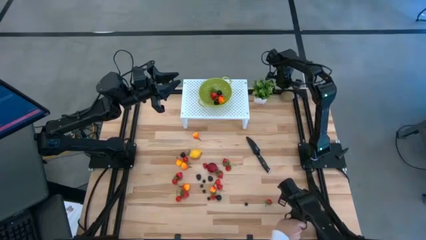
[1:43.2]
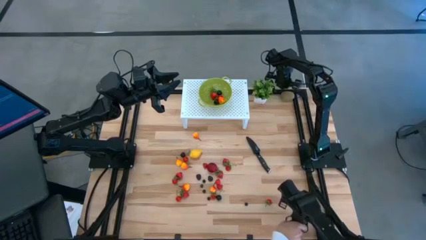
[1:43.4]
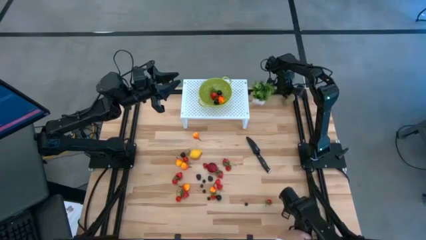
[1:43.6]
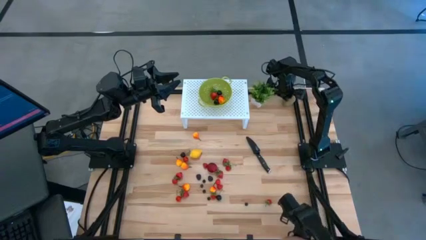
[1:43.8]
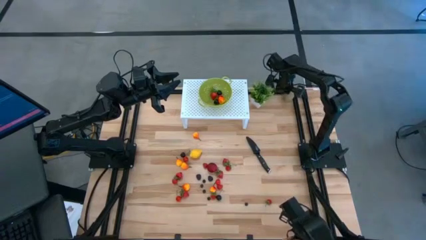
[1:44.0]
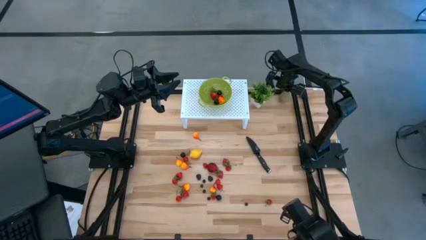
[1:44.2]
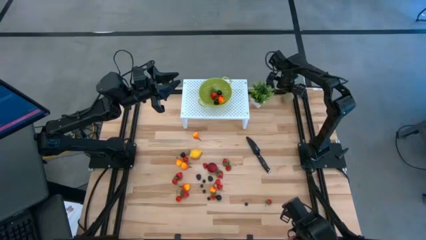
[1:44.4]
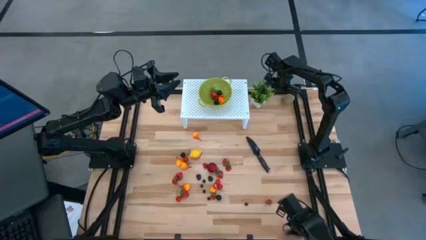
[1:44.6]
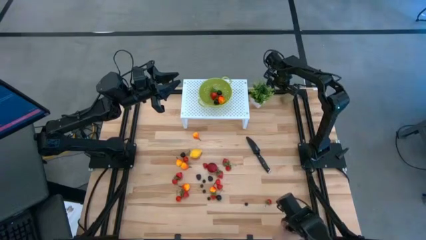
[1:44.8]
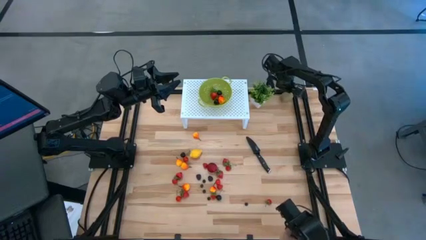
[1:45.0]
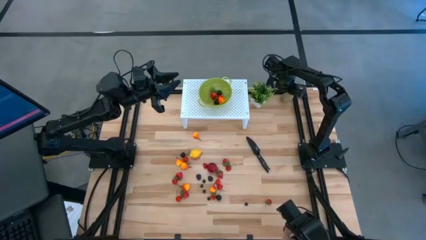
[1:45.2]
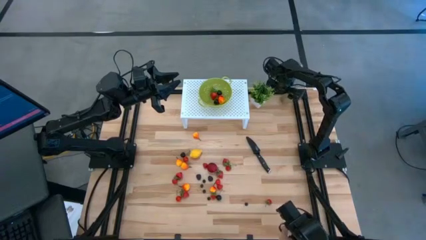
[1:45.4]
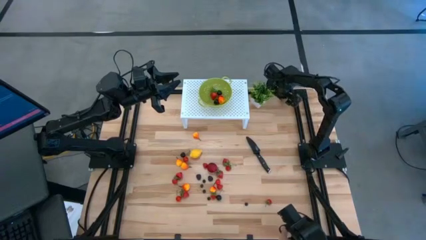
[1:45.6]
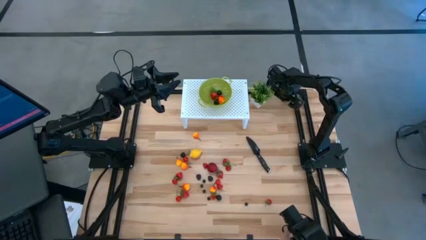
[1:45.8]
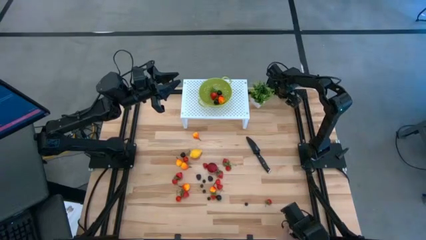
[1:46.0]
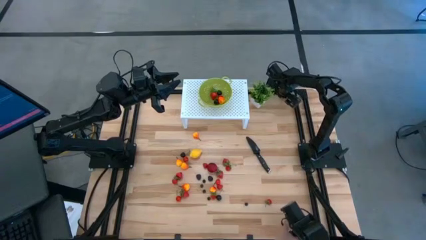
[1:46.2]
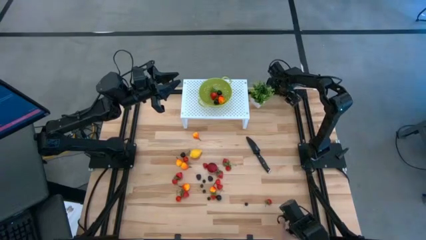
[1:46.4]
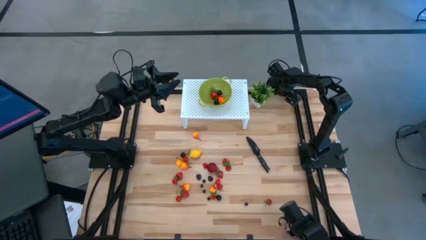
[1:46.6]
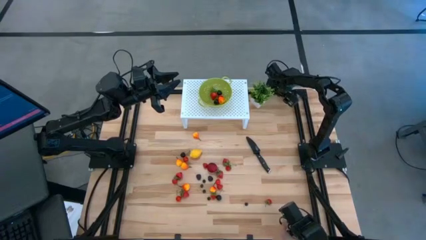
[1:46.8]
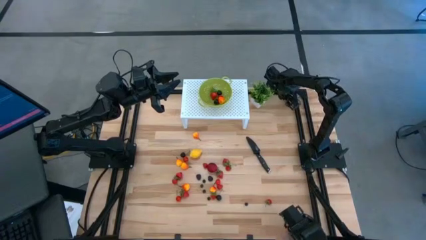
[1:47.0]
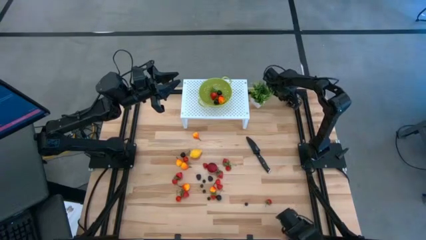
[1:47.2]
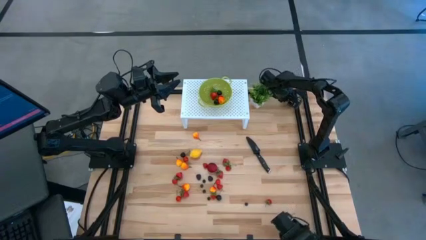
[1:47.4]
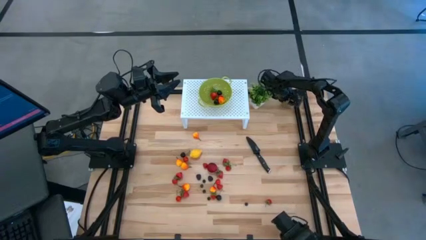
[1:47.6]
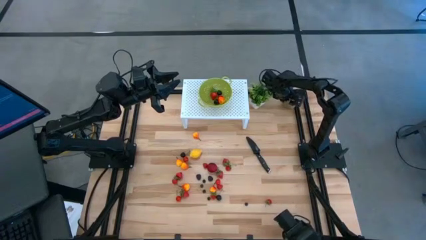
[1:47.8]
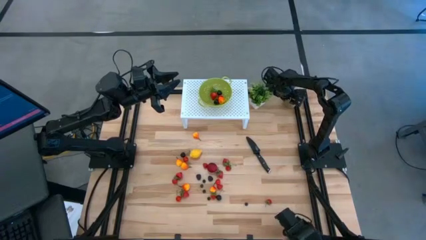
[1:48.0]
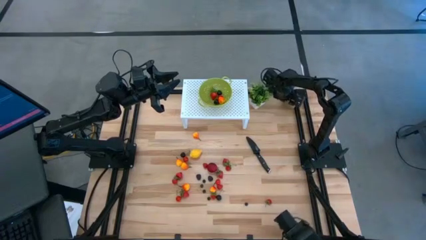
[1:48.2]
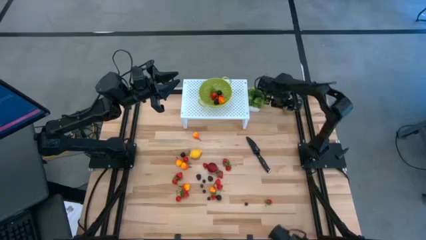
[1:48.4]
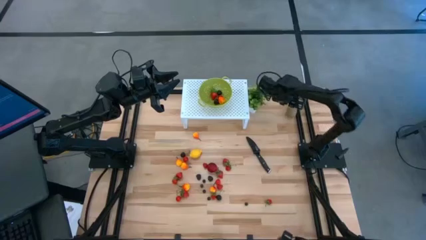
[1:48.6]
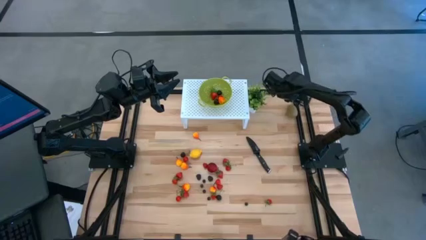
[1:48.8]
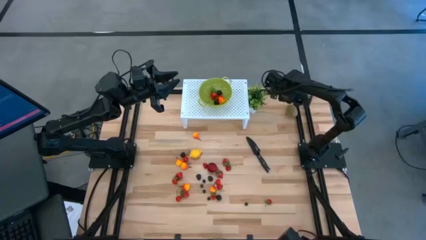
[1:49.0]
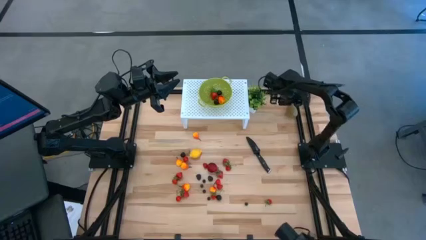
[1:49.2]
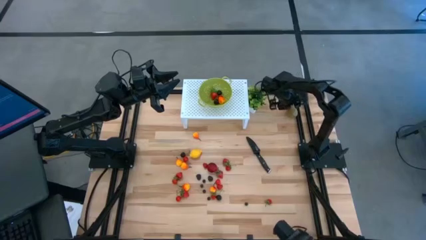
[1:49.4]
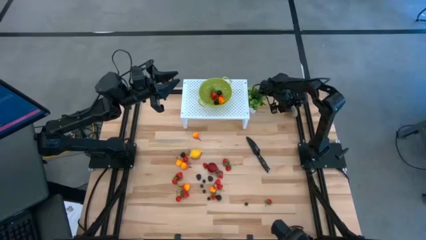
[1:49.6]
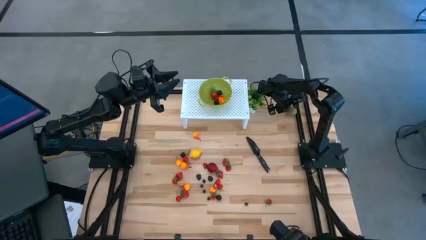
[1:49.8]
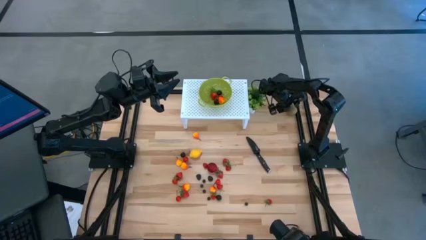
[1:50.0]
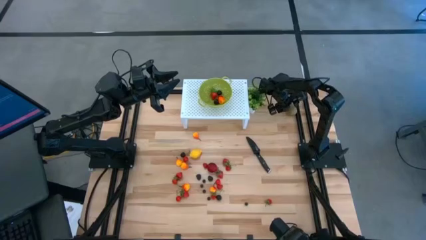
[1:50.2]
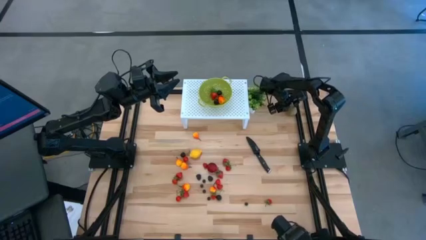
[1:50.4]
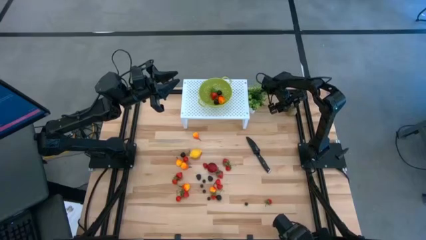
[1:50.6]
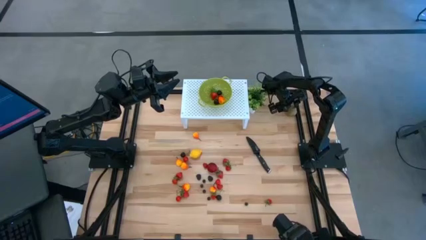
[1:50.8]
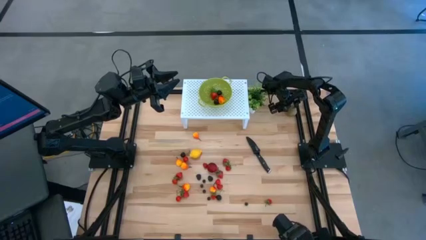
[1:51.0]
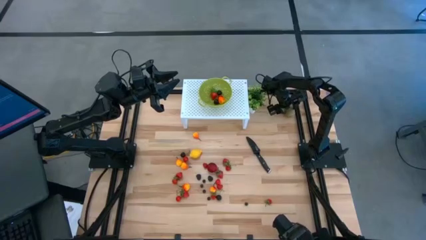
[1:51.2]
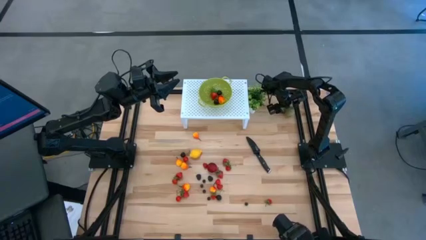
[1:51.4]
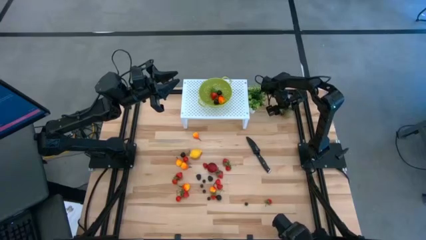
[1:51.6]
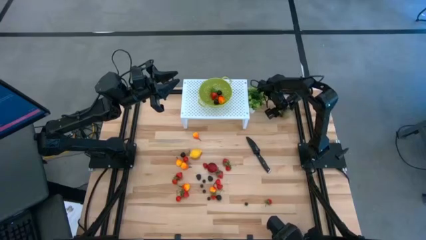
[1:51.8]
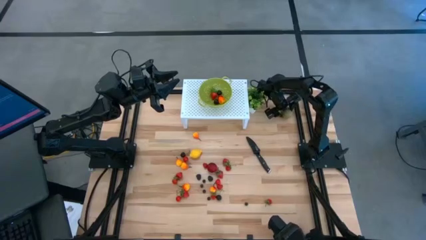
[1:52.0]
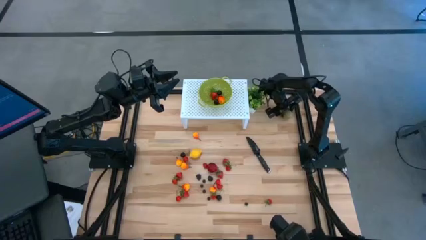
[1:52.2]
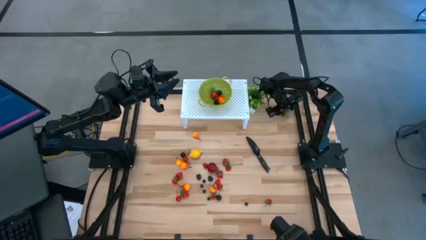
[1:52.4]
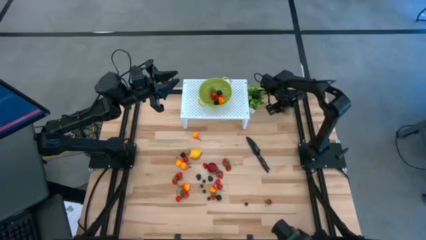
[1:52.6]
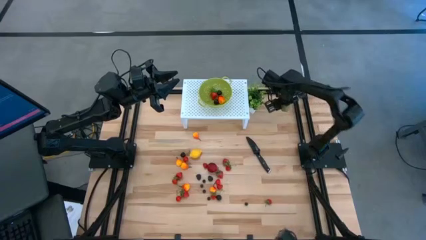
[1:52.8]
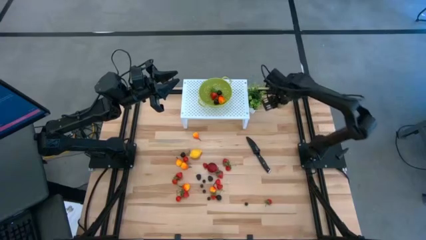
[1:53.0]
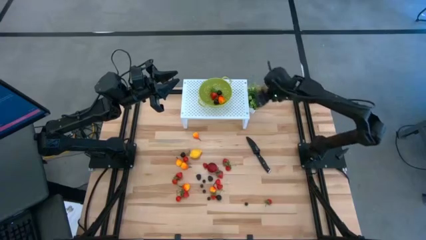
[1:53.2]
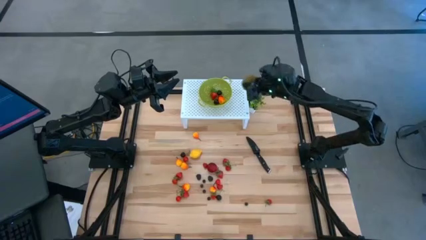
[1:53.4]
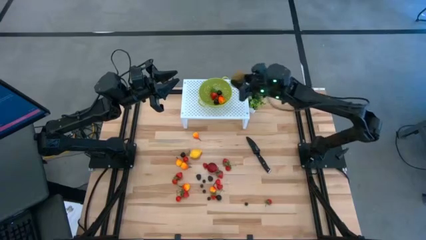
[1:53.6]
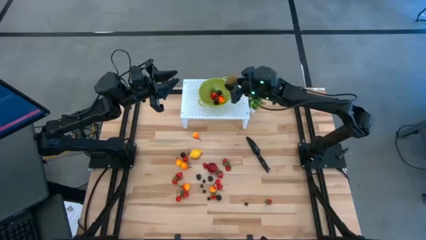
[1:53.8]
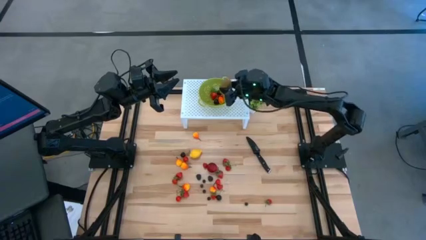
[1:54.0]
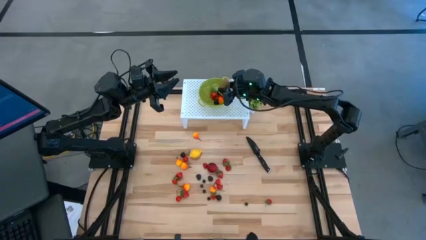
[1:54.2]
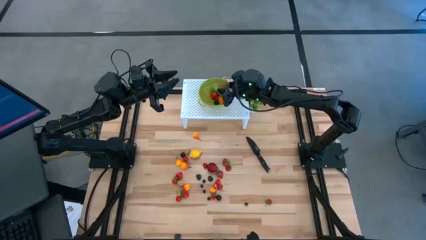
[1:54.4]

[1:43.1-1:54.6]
Task: Pick & Place Fruit
Put the brown kiwi into the green strainer bowl

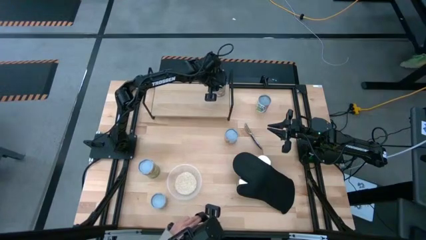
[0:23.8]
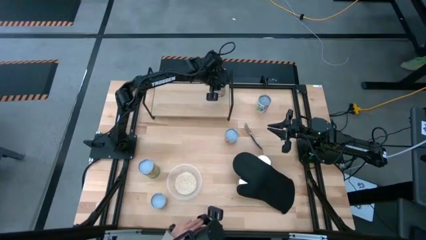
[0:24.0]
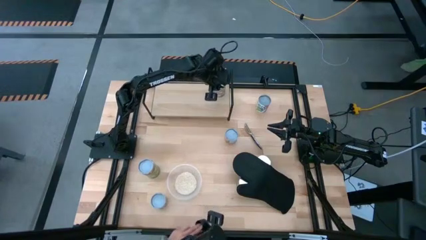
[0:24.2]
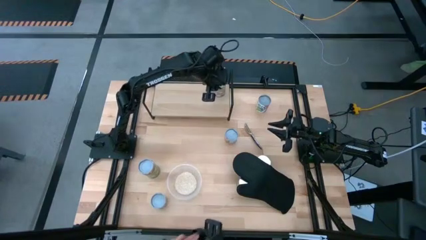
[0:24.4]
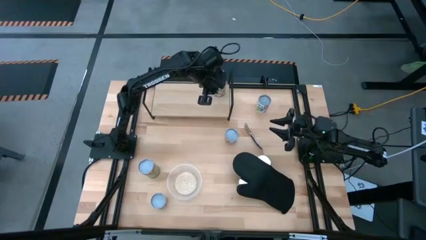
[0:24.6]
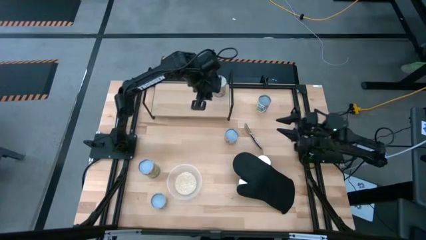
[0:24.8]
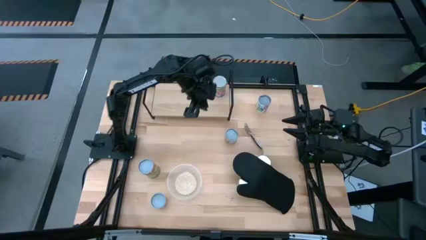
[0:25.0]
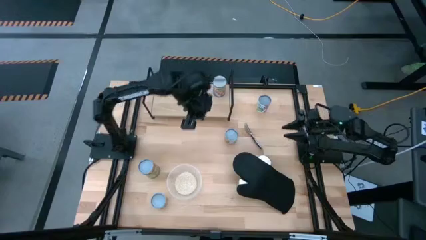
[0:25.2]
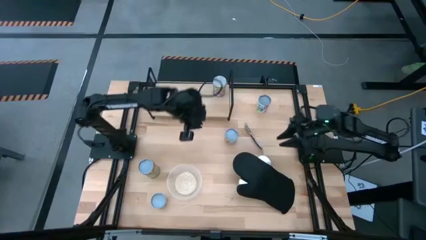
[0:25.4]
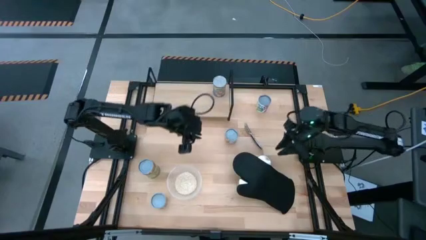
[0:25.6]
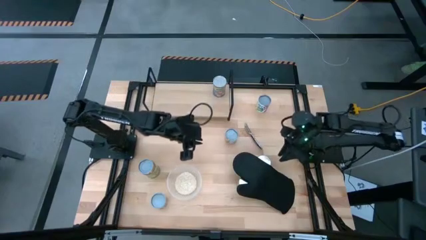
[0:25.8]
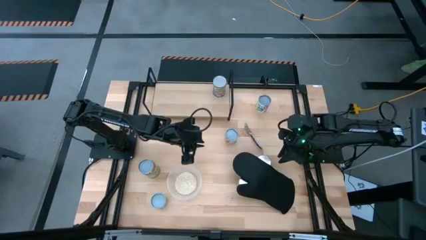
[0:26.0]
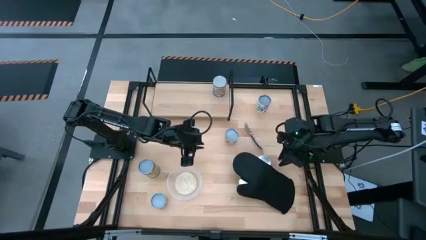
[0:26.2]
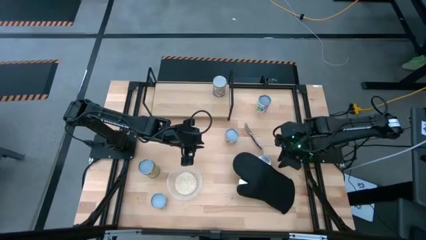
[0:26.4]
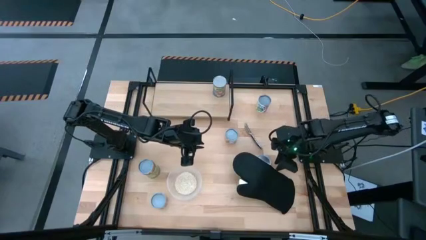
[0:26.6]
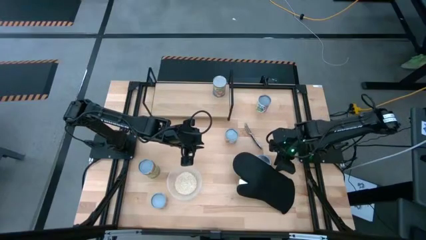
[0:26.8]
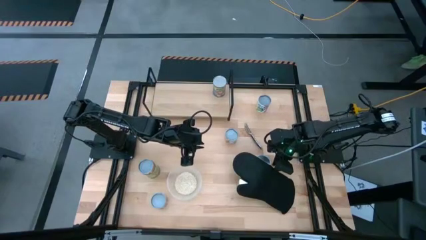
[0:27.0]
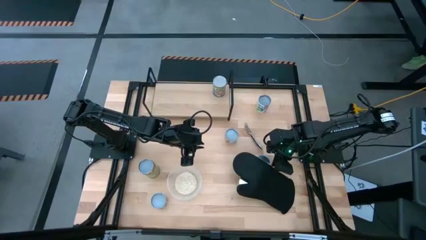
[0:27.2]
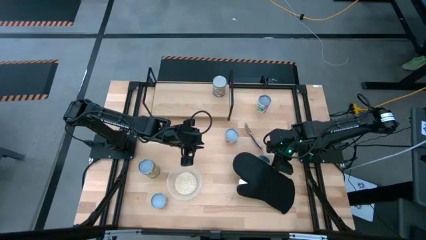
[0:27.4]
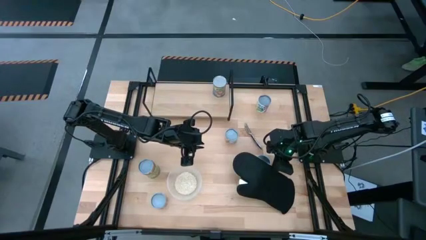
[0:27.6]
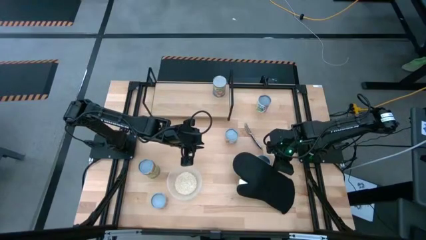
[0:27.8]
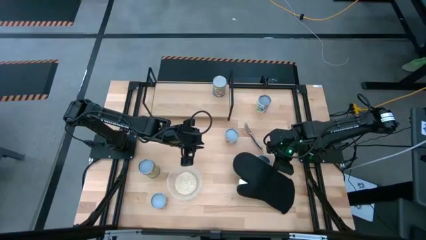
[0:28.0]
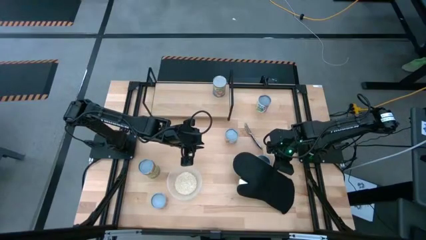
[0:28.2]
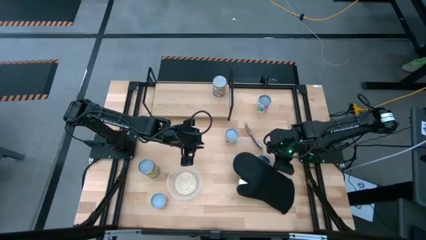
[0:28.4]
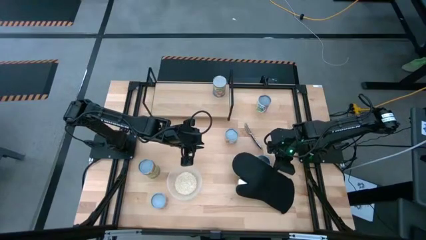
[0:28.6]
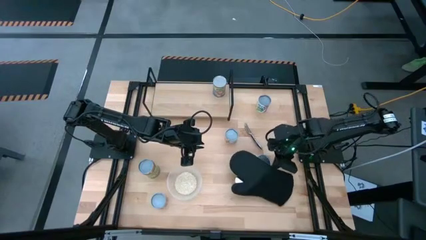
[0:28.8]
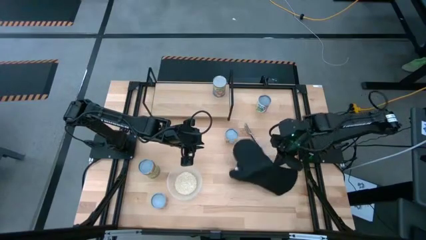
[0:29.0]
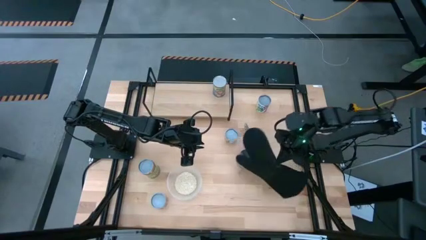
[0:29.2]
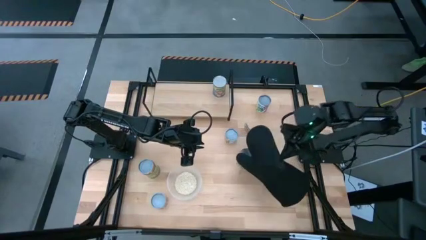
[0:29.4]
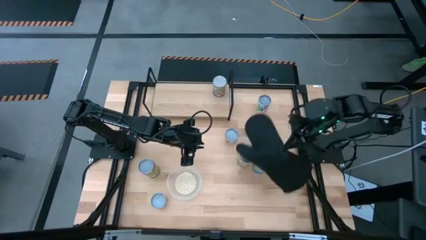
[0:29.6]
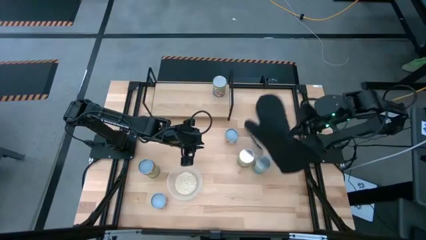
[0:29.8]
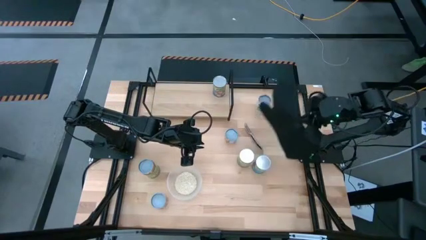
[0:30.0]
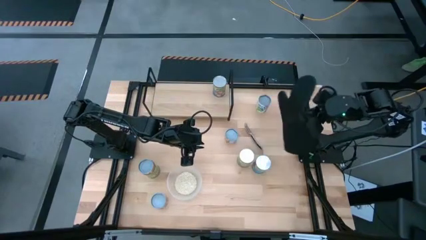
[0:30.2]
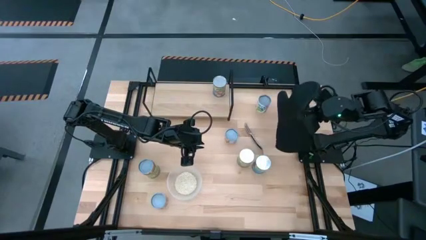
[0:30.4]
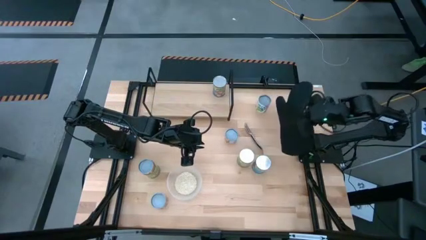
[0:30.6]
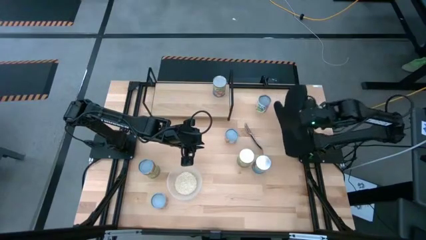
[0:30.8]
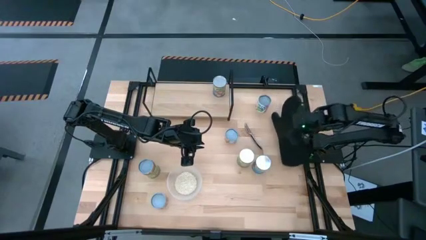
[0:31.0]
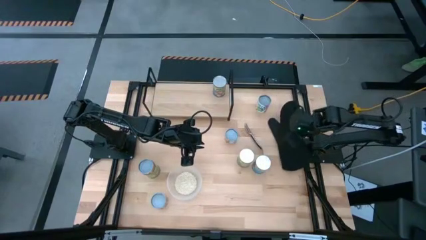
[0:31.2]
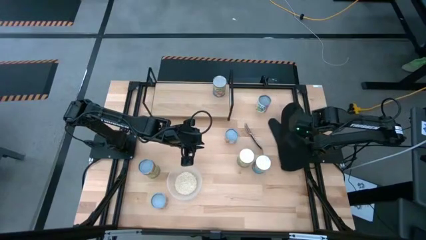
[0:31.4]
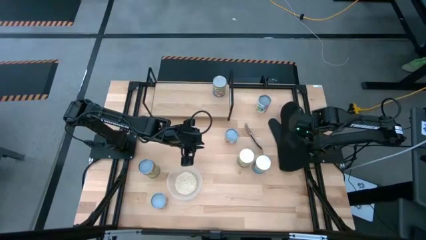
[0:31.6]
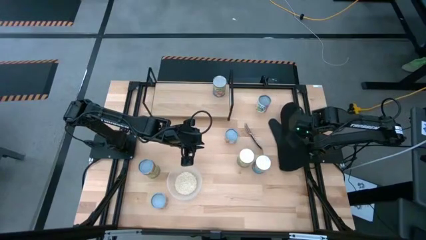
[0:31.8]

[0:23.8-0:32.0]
Task: Pick and place cans onto a shelf
Move the black oven glove to the top right of the table
